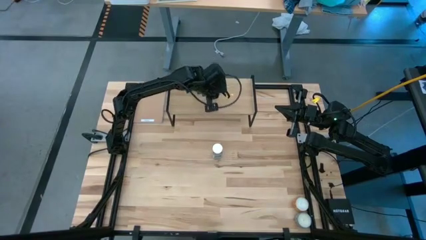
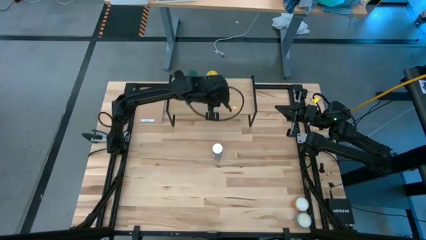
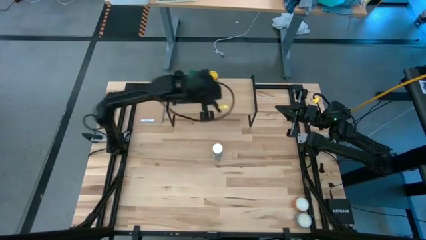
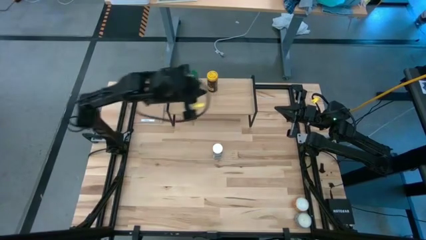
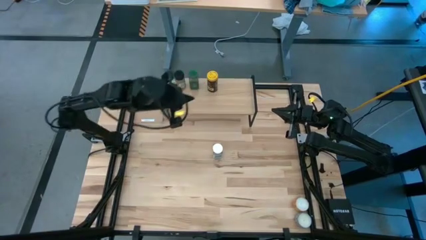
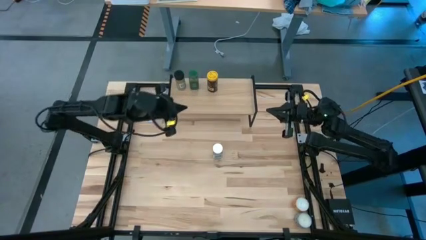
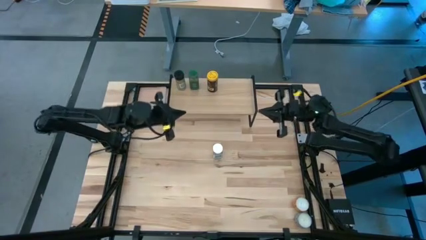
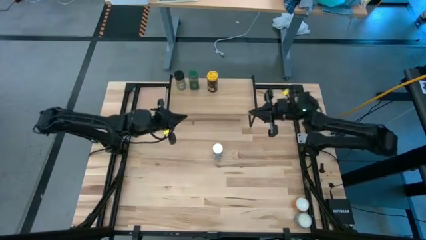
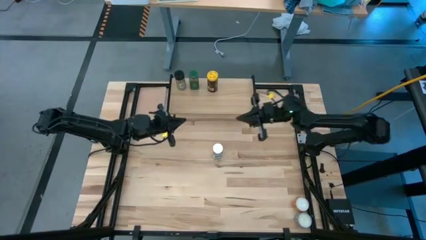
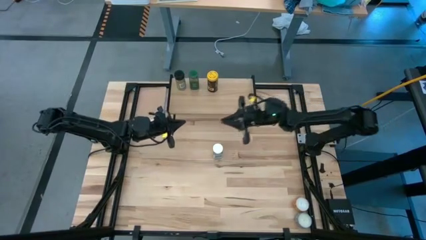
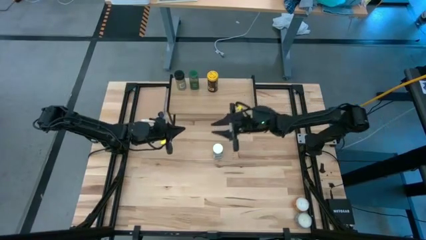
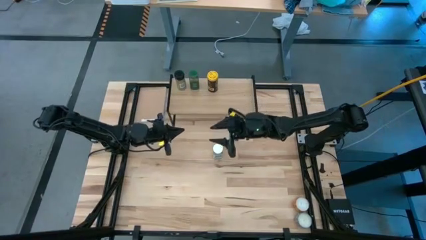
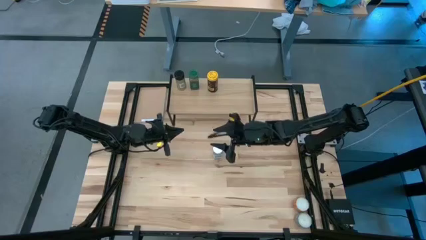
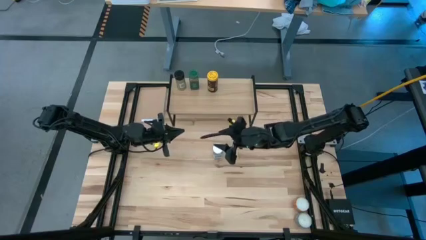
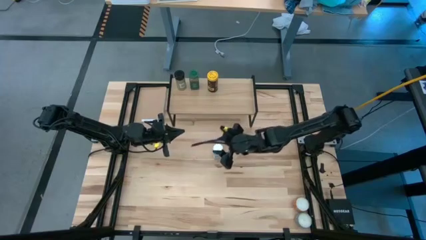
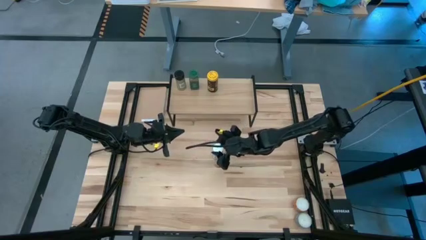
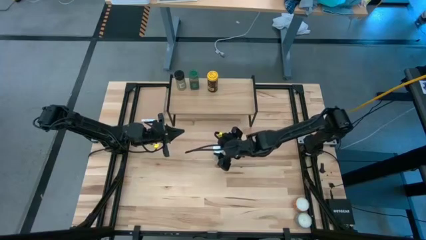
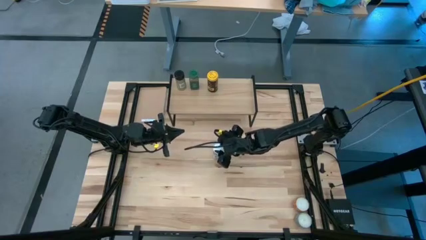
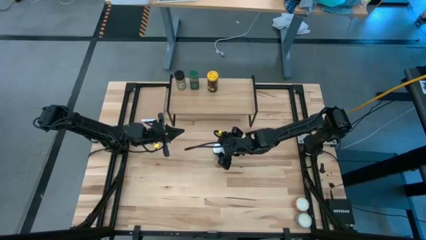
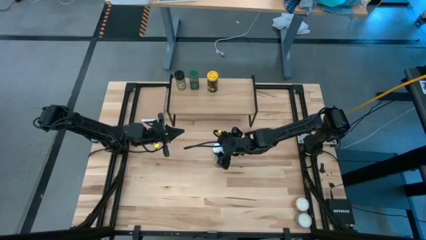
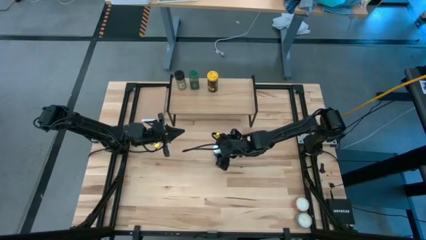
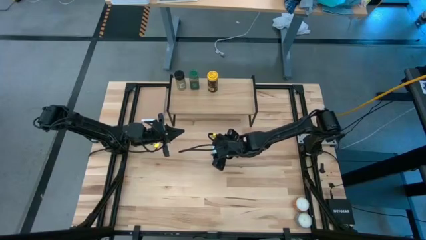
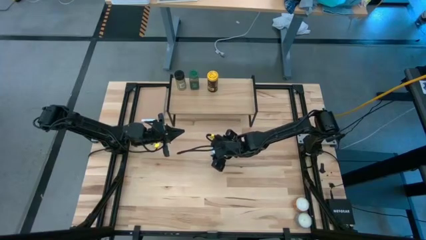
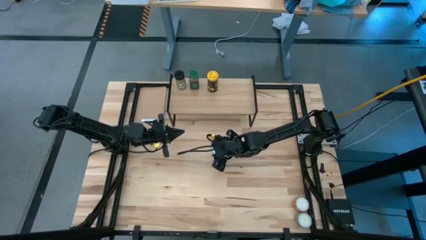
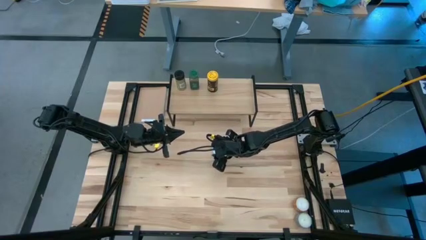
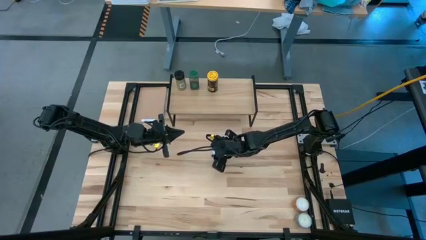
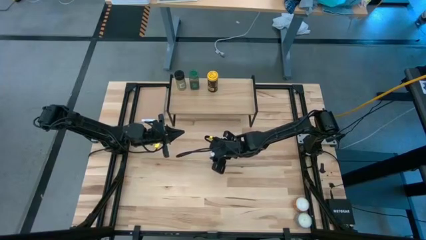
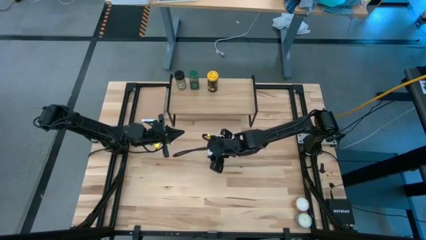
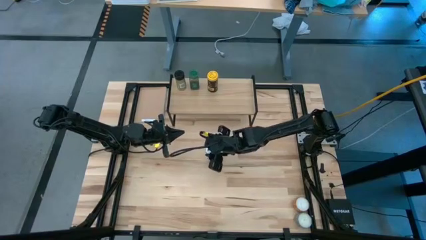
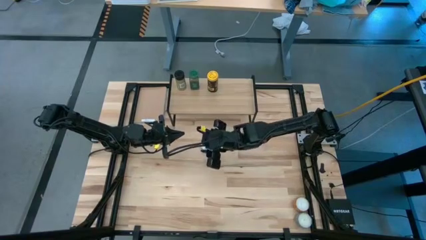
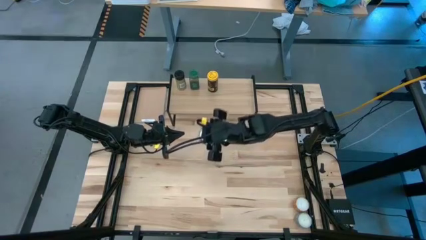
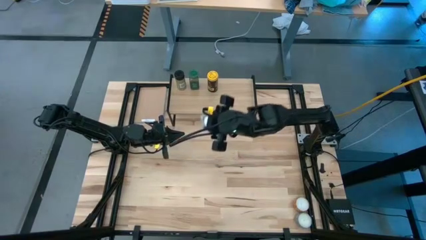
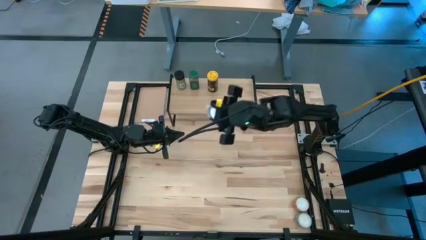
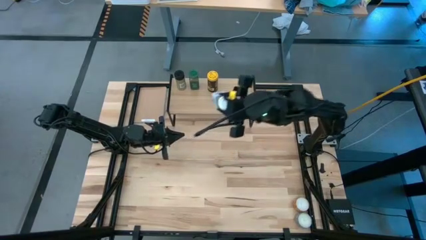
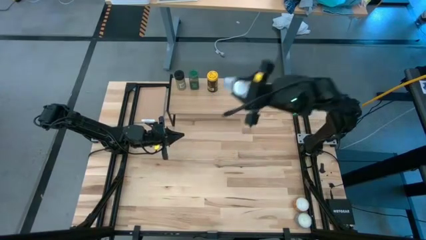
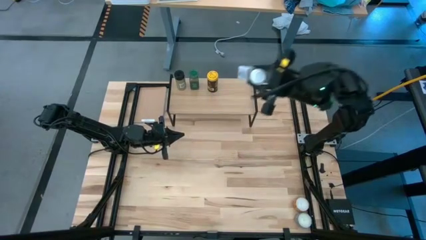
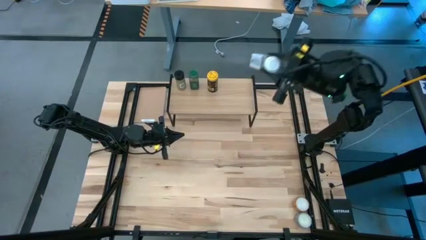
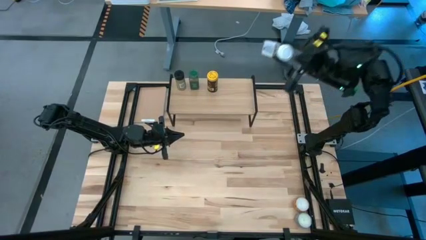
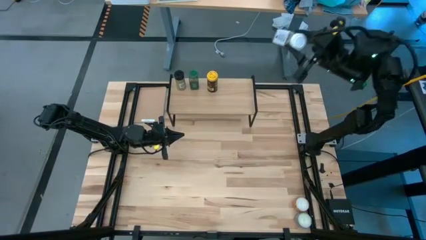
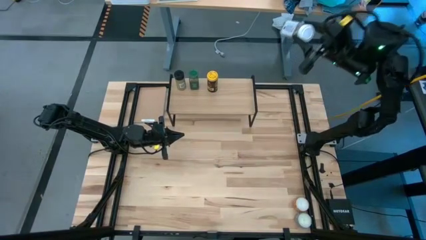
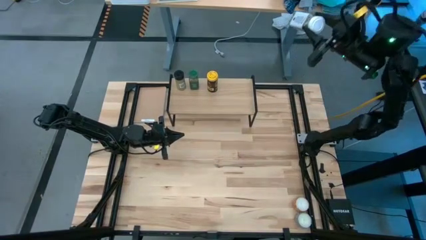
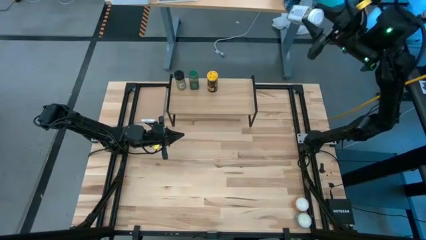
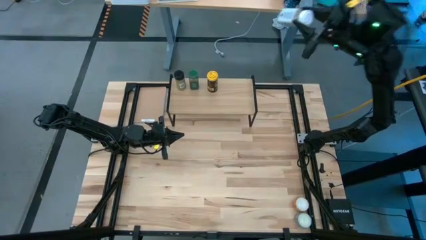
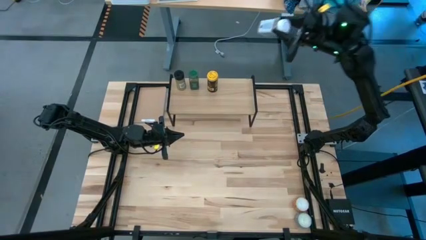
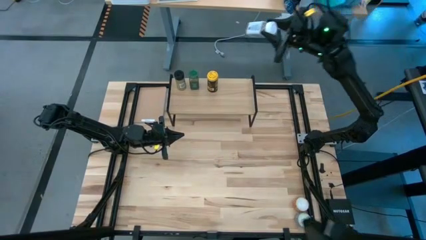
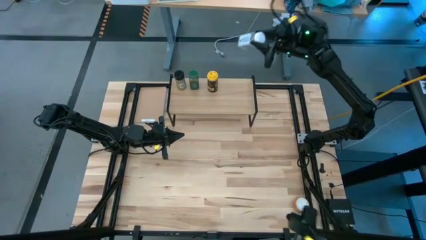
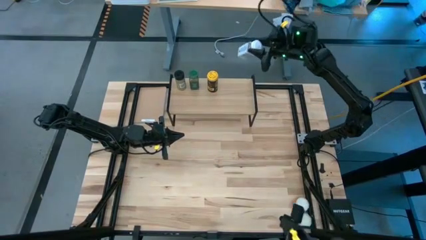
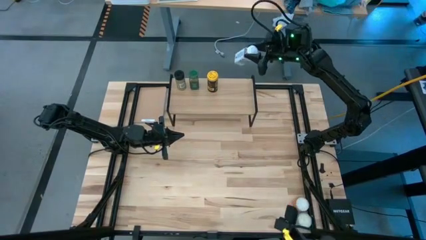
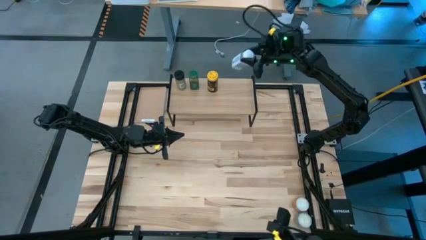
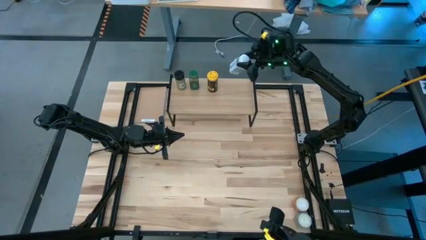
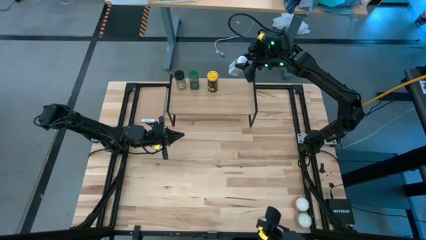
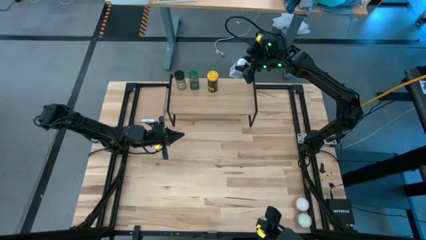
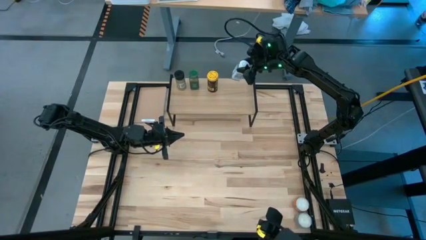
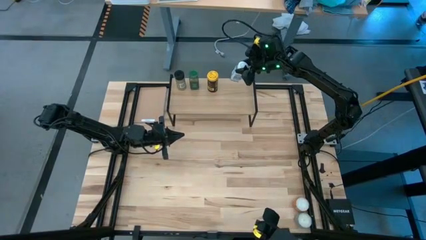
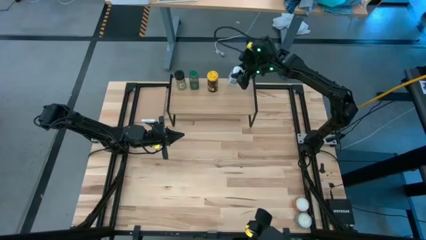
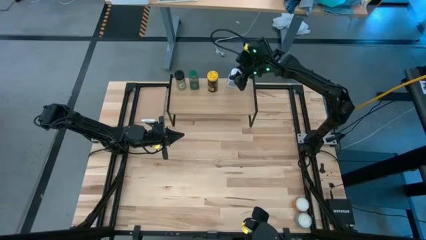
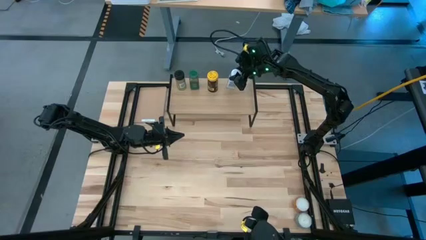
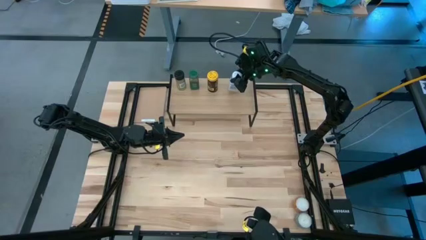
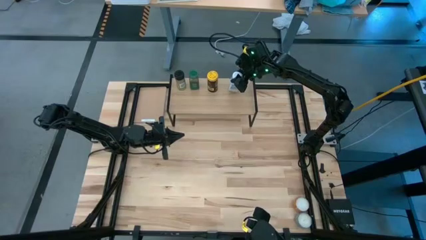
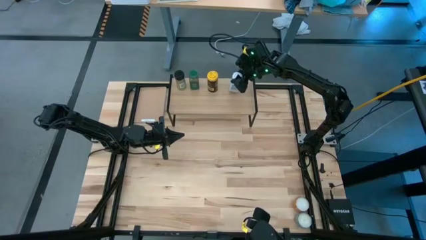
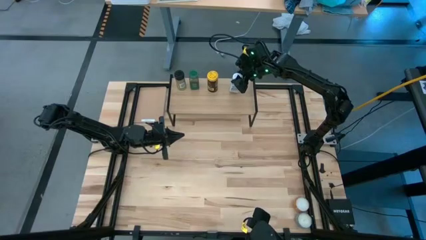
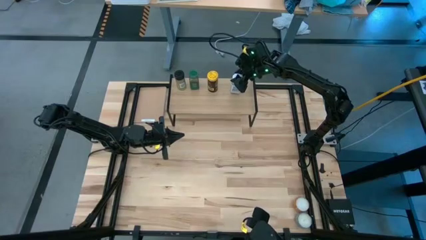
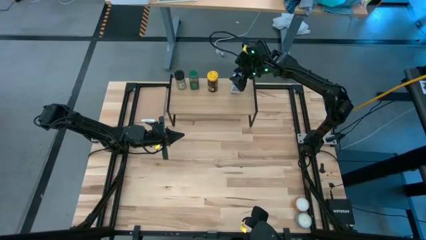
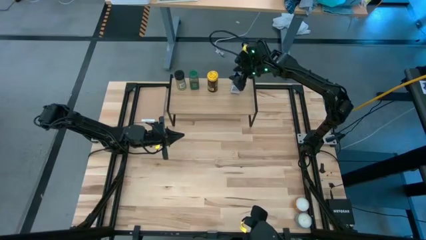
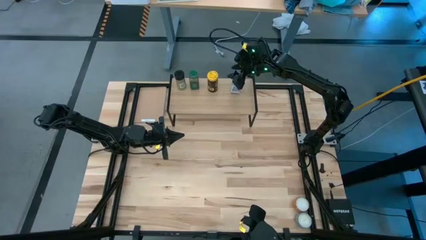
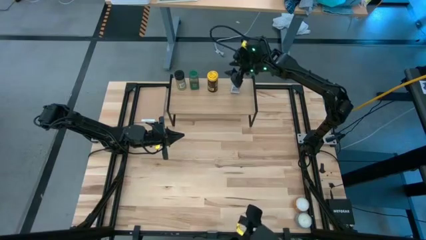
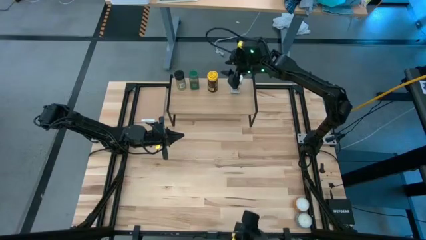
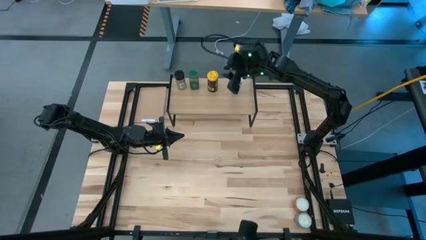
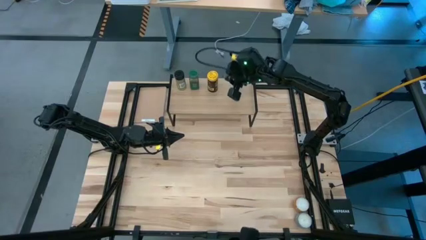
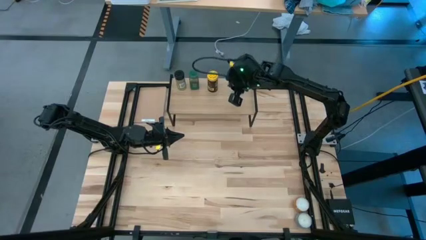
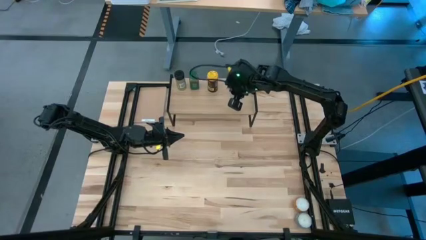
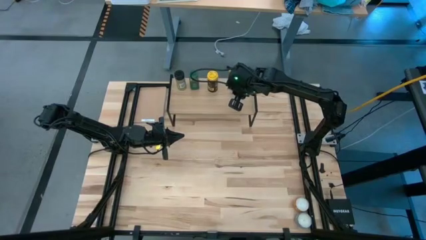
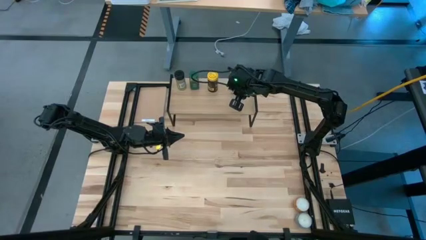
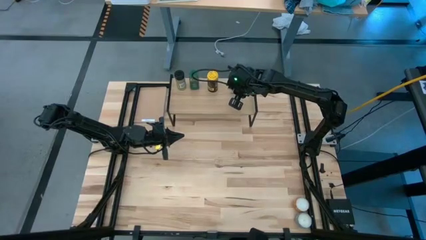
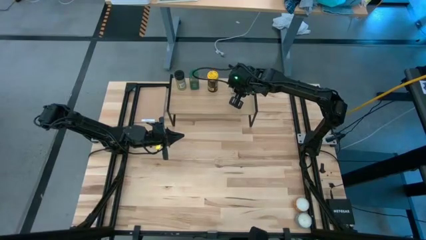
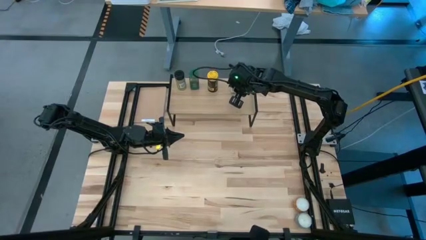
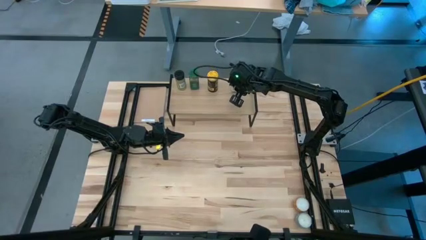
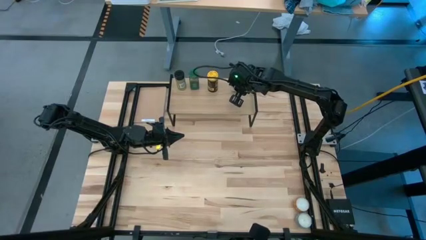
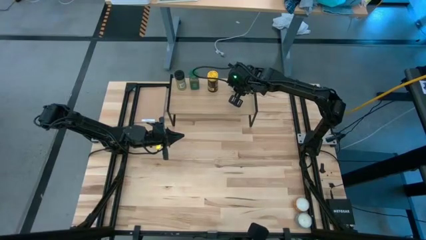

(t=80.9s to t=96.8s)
Task: Shelf spices
Put the white seasoning bottle on the shelf

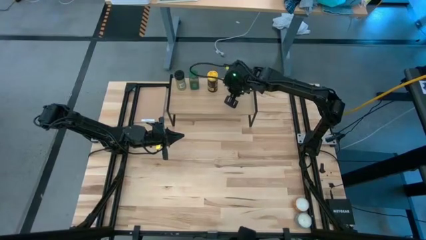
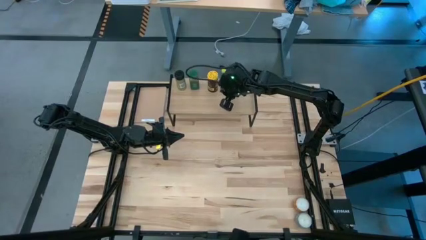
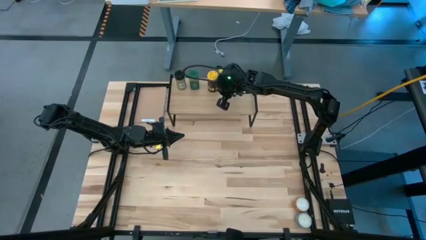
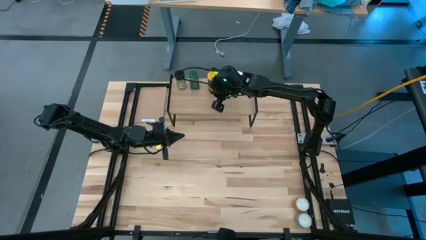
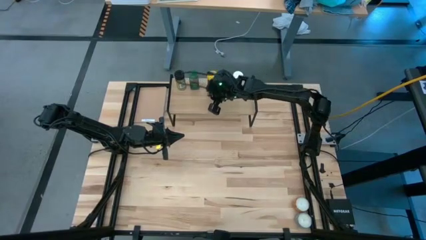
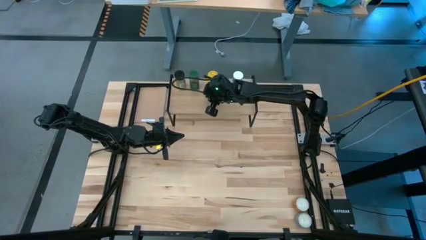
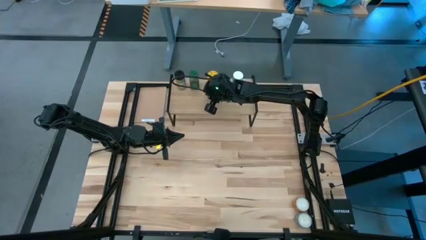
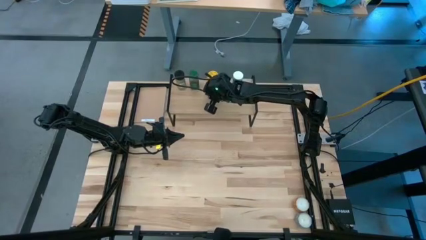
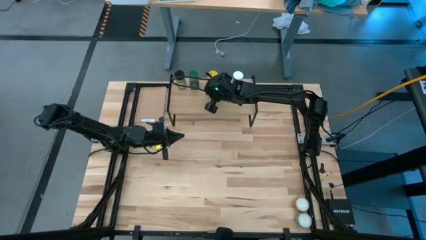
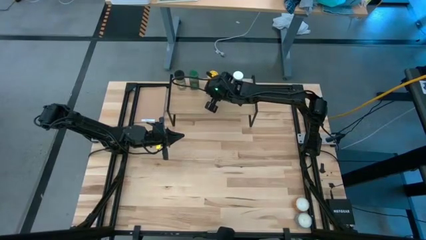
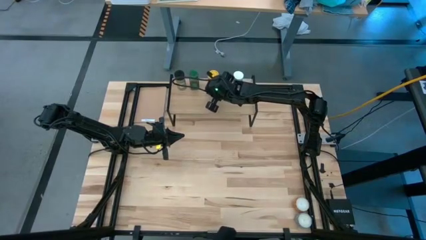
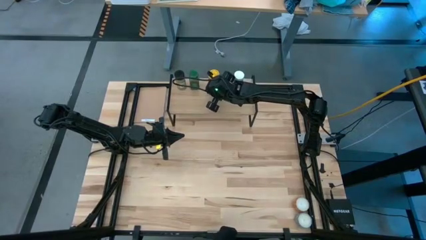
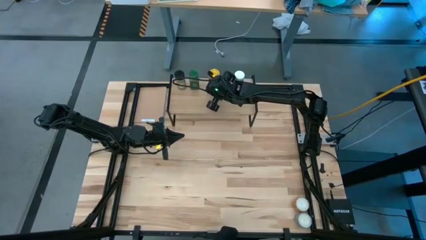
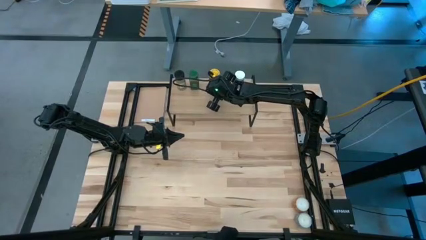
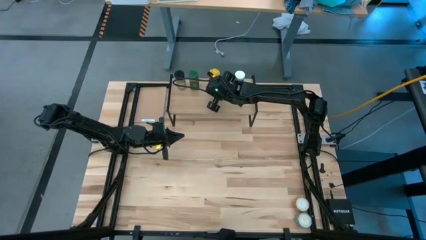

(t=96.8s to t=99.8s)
Adjust the yellow seasoning bottle on the shelf
